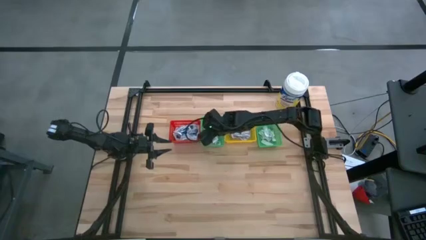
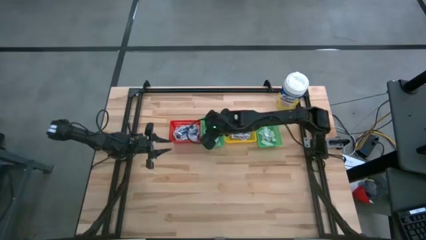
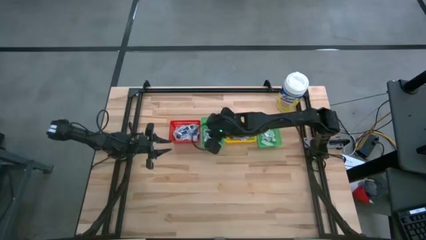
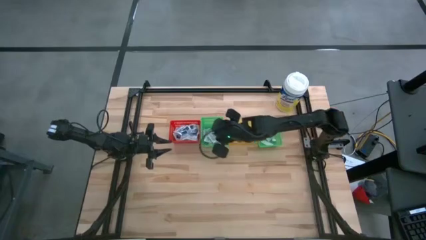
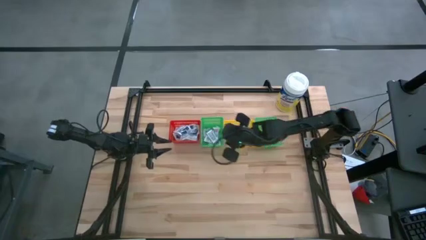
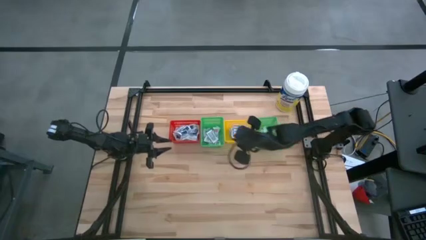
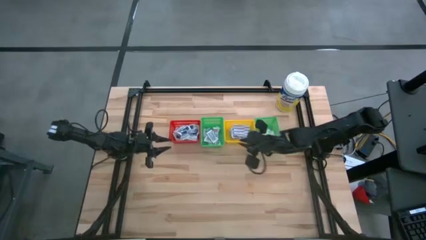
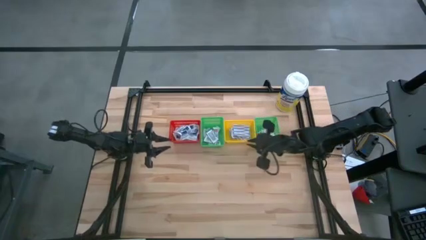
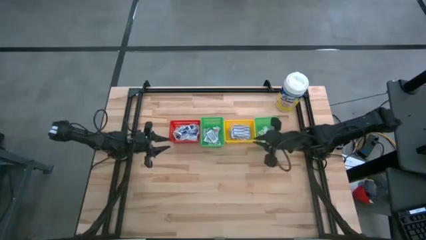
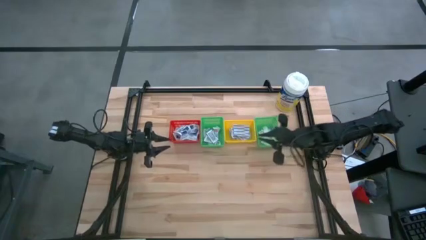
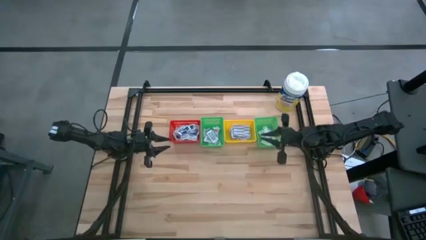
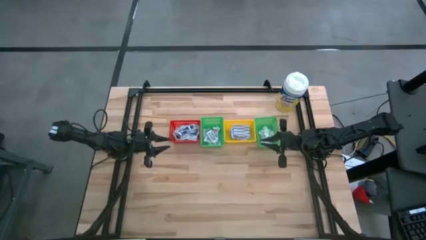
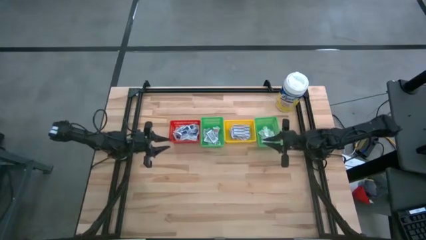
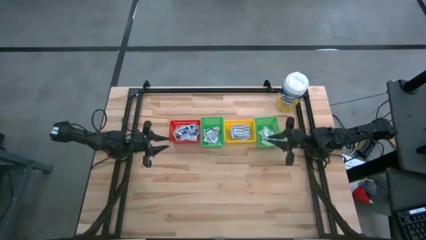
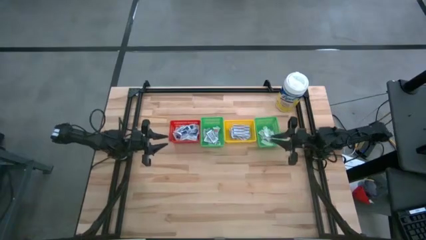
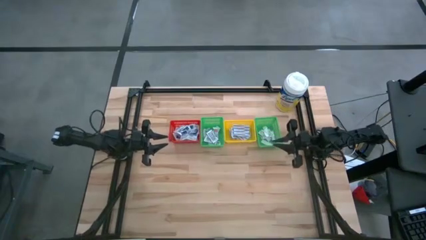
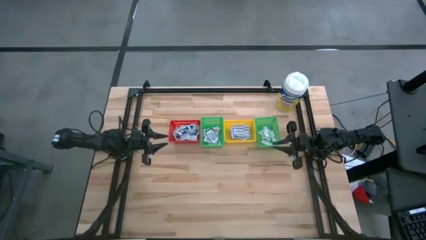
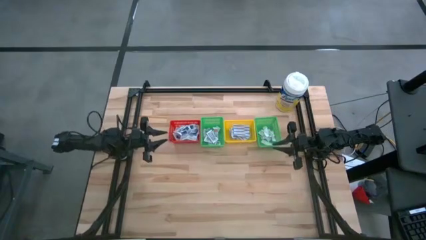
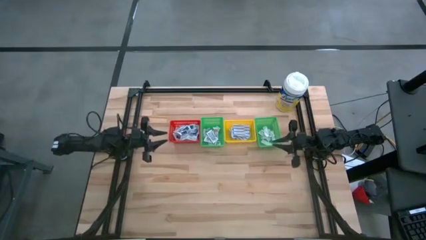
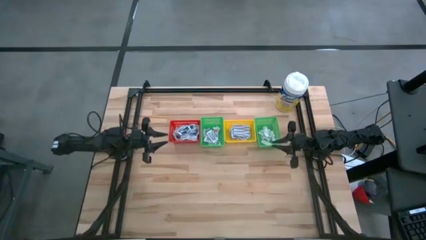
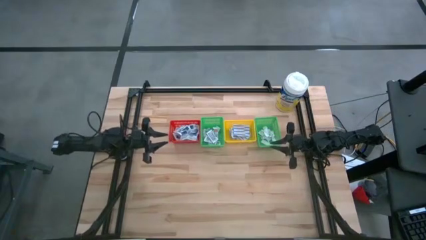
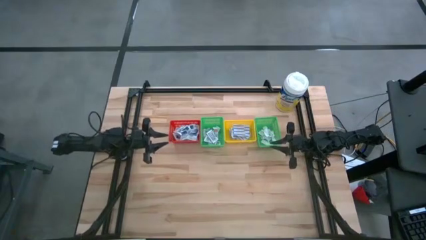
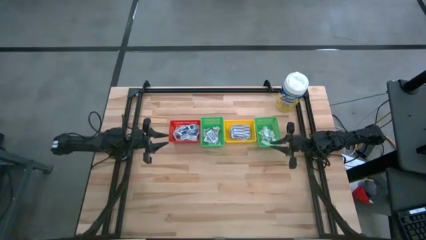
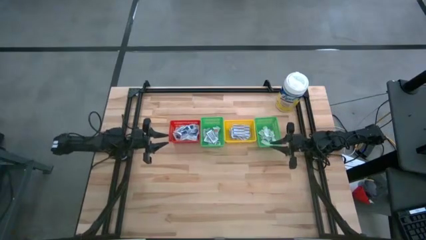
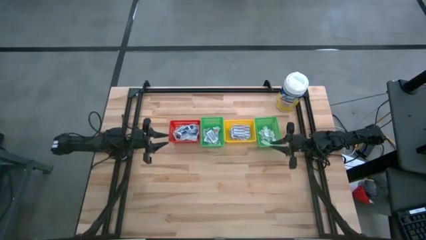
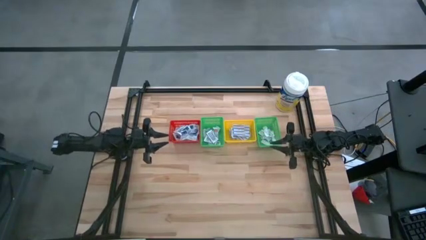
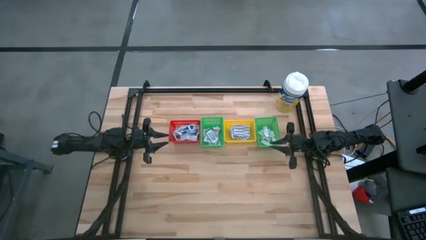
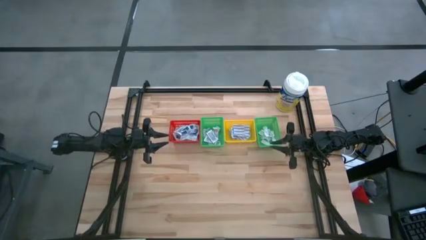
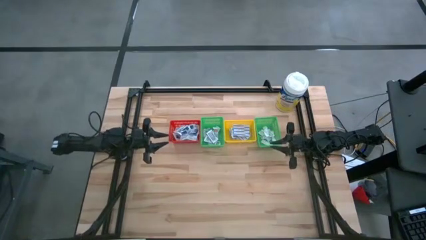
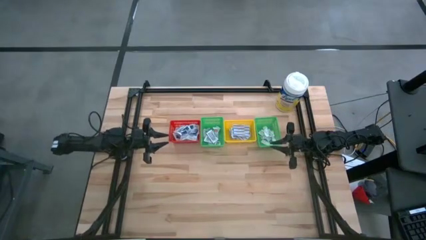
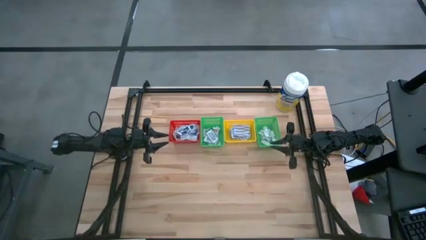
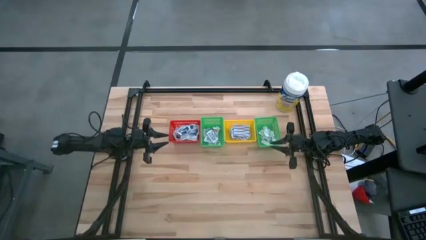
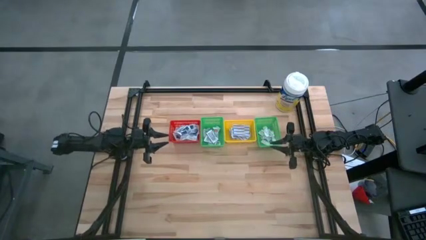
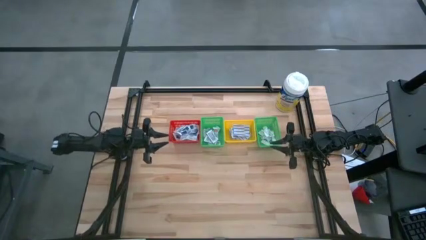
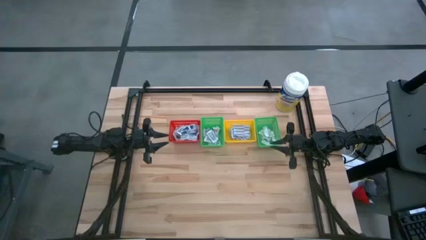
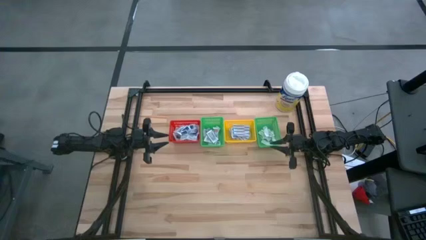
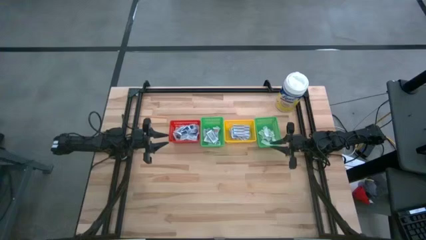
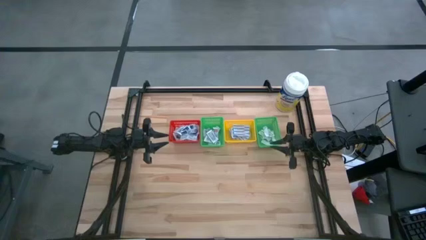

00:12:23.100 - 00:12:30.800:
Task: Pick & Place First Aid Supplies
Return to Home Position

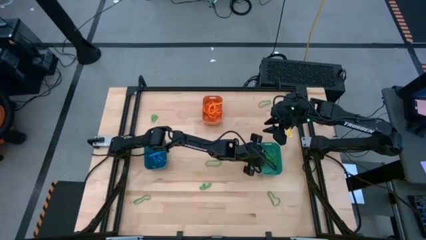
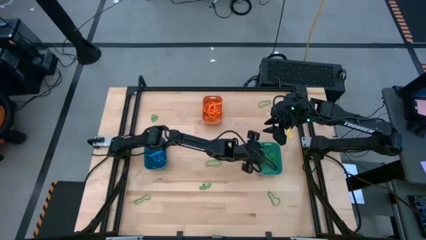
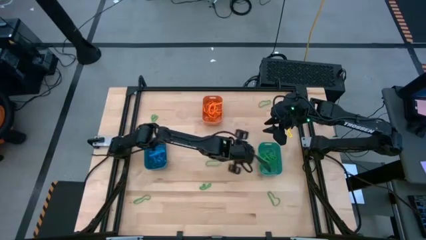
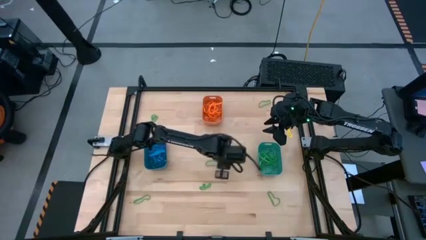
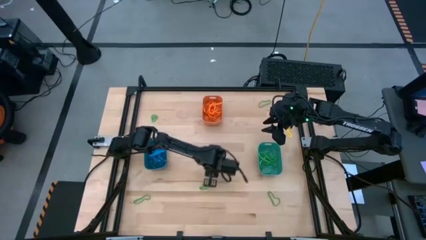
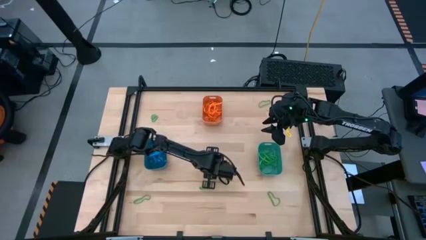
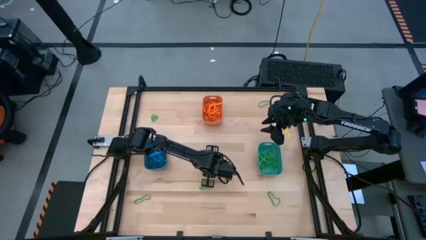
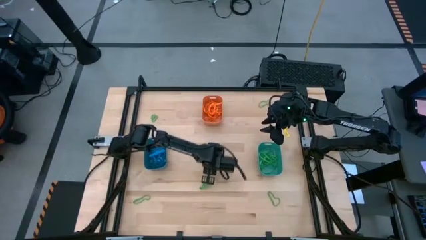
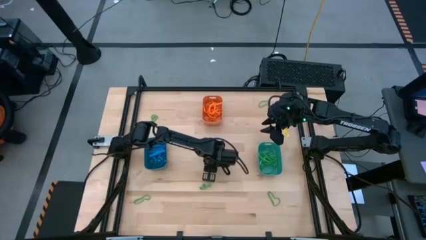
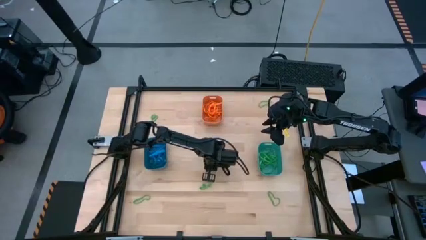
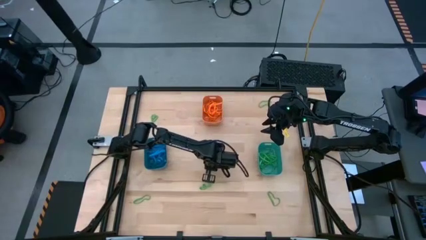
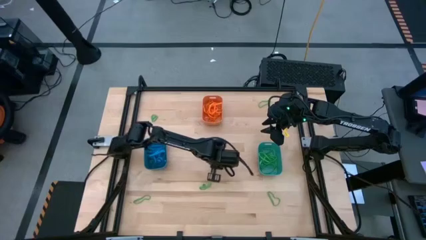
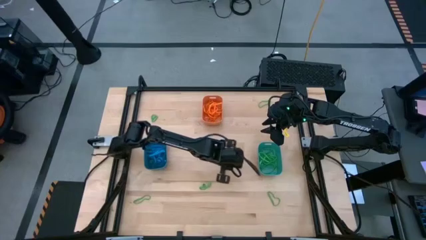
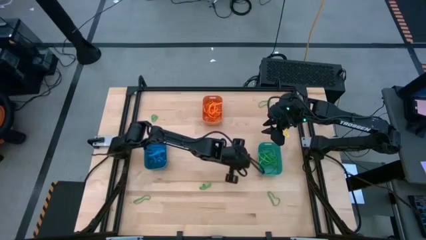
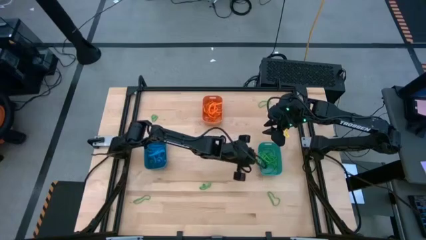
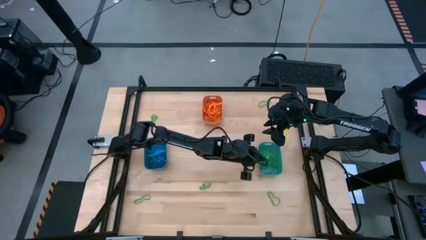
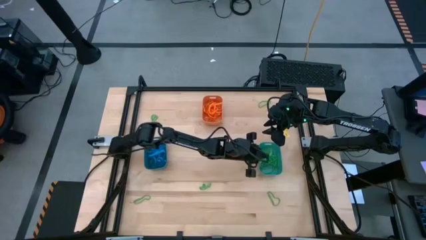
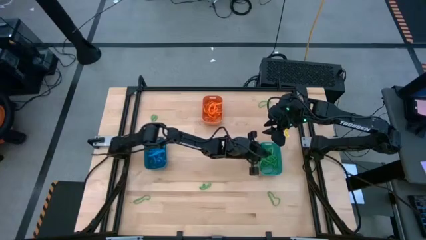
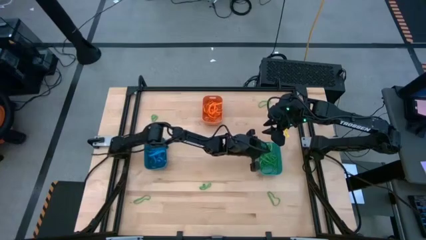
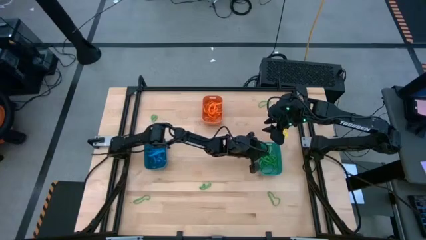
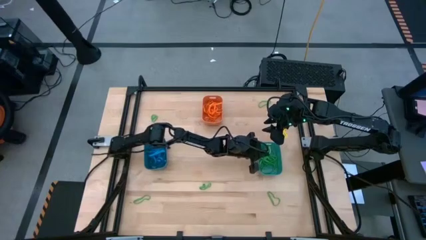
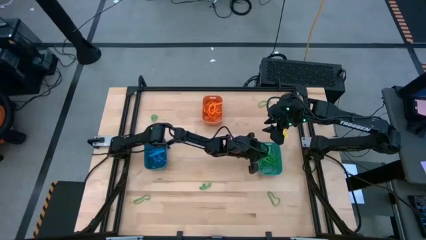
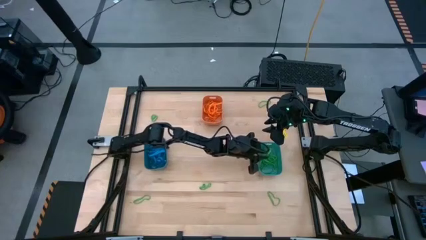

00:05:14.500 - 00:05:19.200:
Task: Sort rubber bands into baskets
Put the green rubber band into the green bin

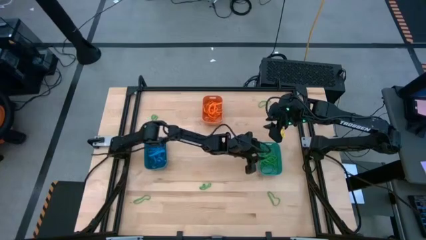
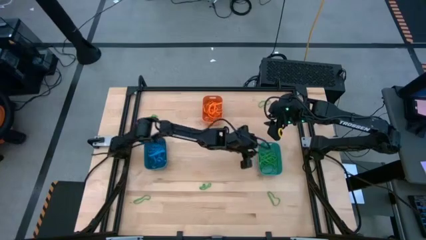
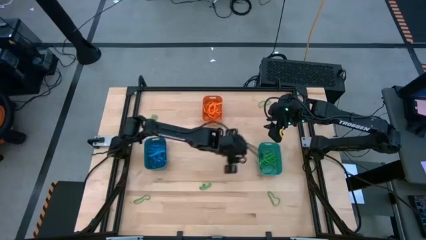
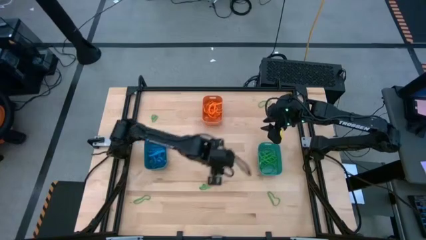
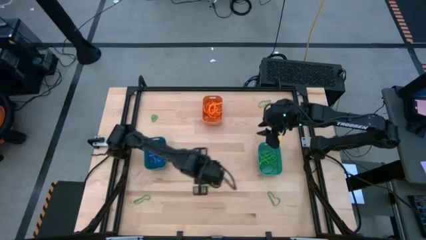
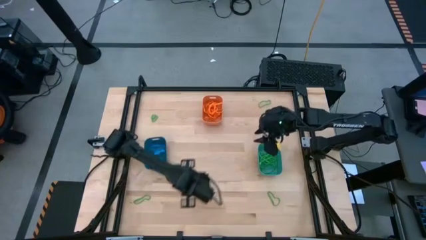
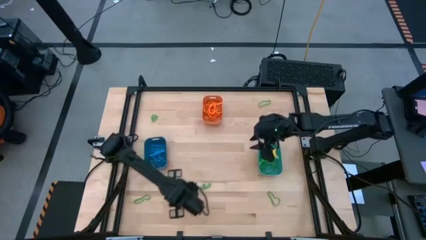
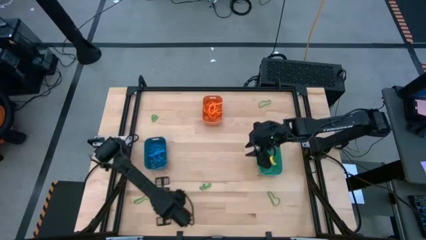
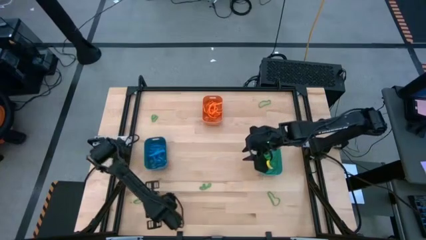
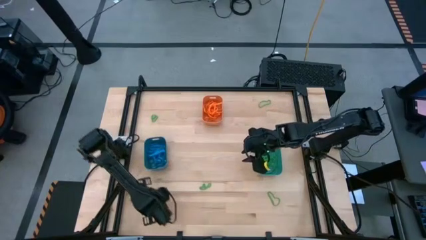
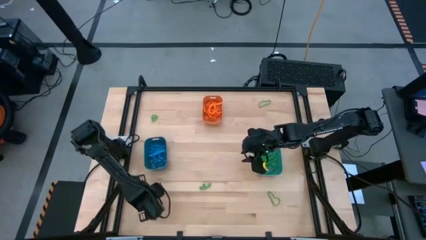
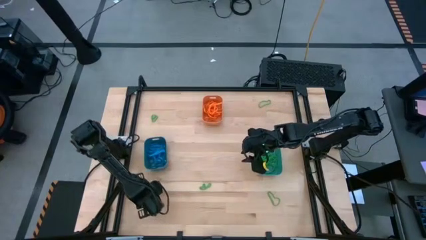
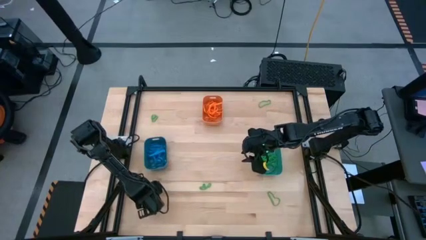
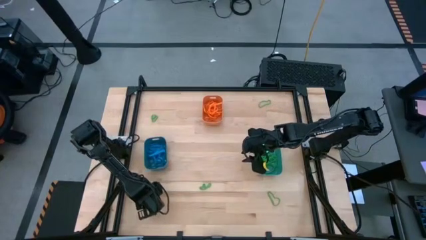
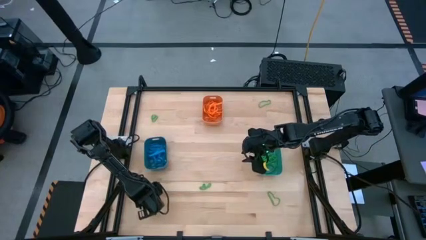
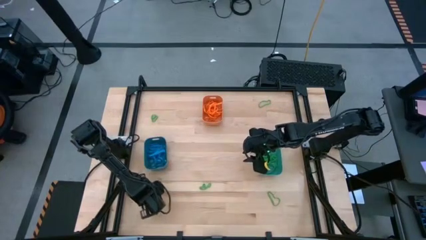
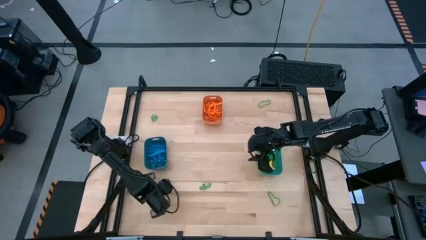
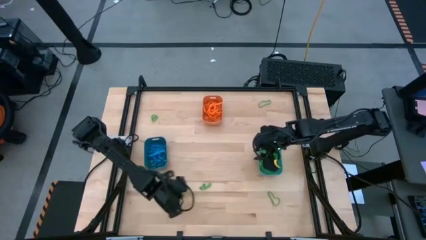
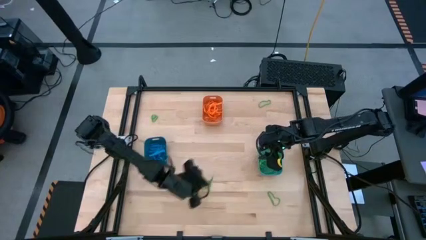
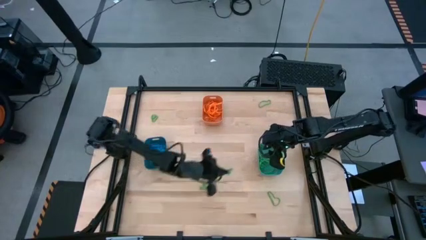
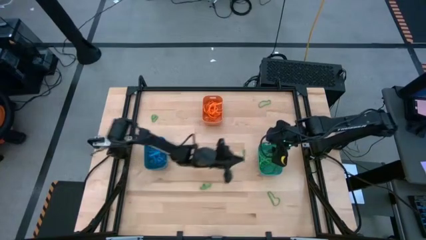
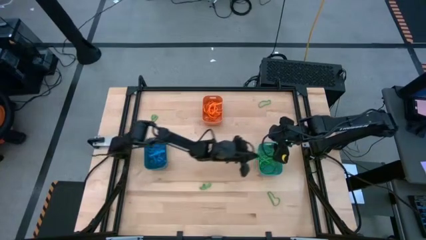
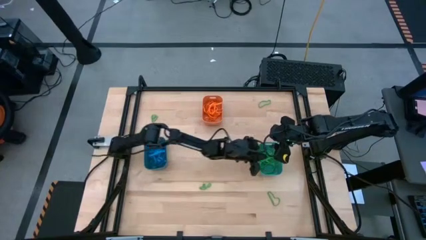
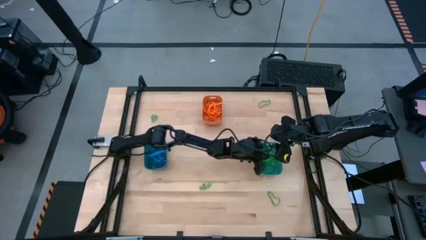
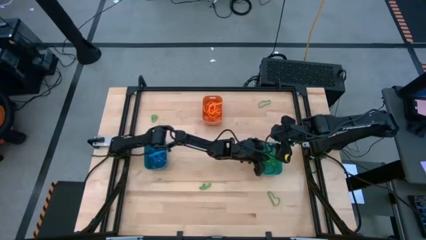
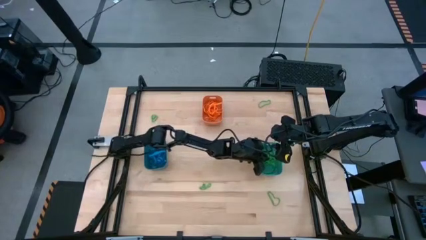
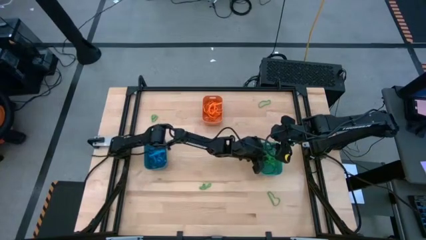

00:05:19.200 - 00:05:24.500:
Put the green rubber band into the green bin
